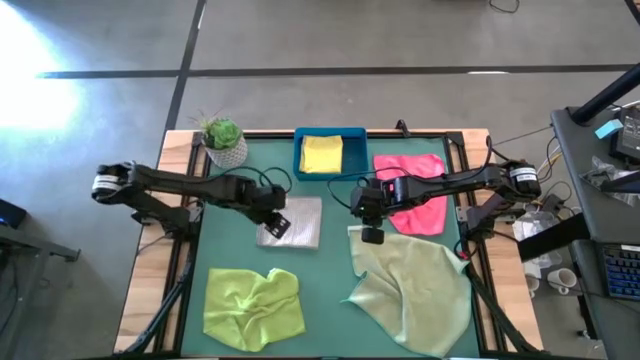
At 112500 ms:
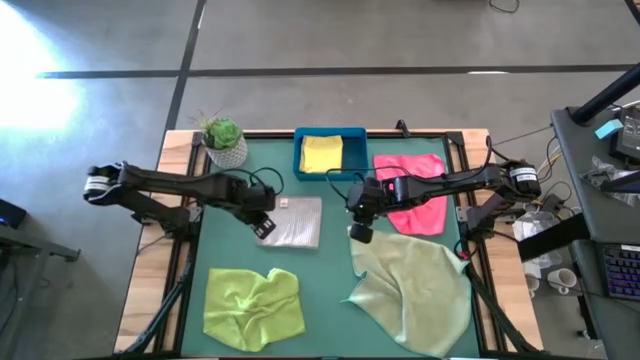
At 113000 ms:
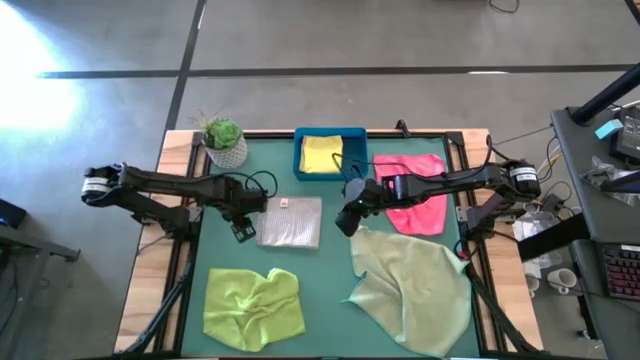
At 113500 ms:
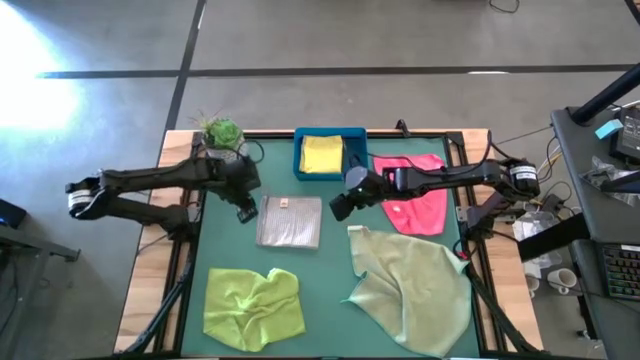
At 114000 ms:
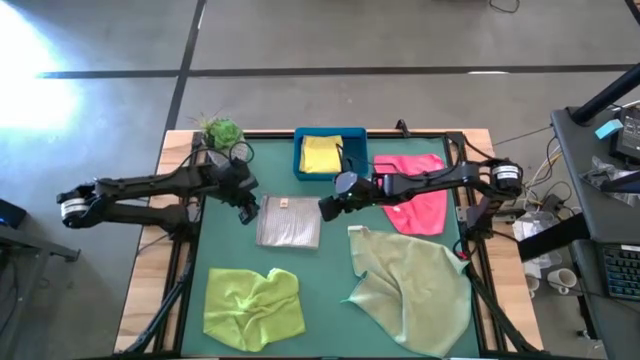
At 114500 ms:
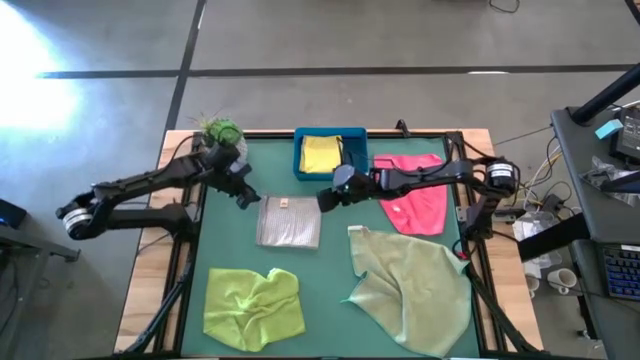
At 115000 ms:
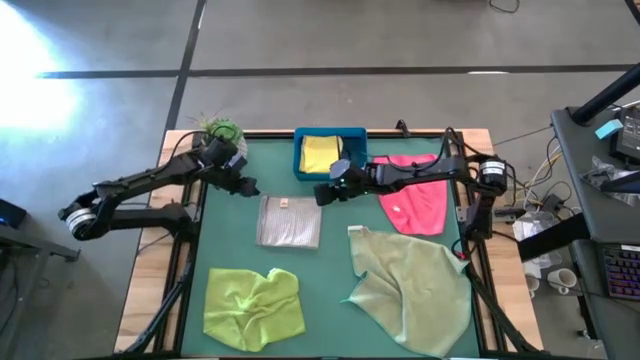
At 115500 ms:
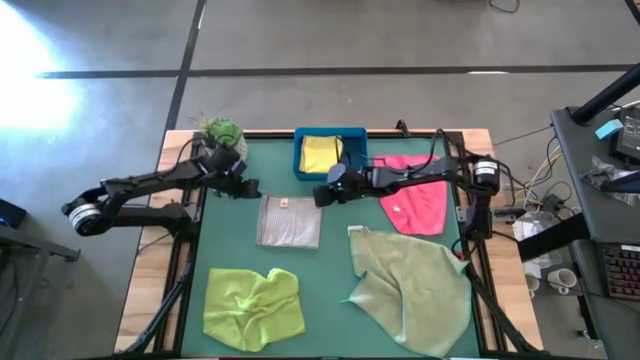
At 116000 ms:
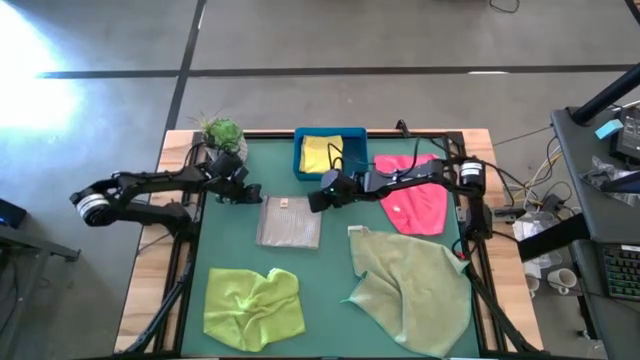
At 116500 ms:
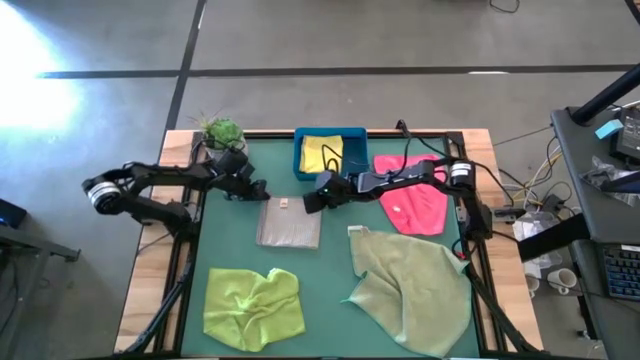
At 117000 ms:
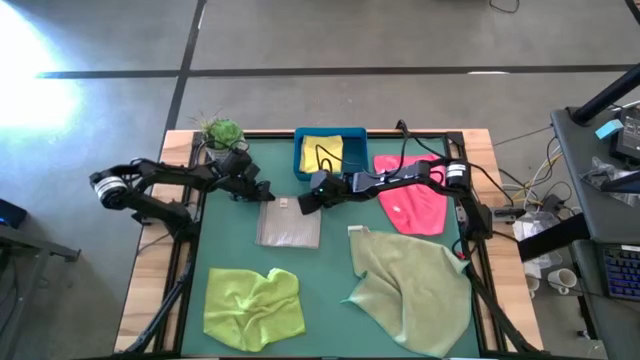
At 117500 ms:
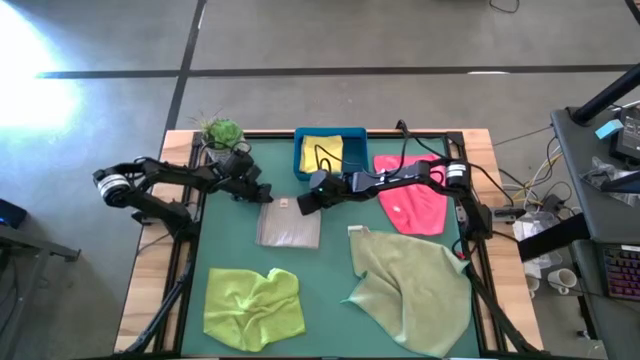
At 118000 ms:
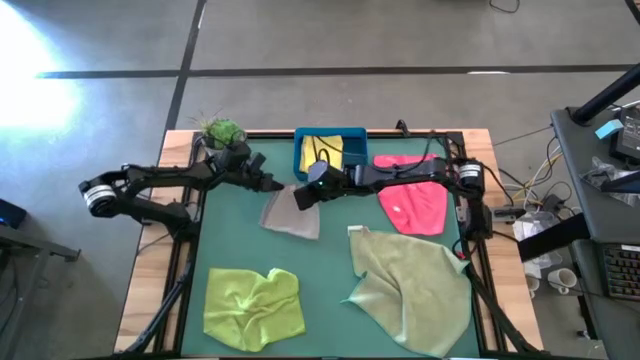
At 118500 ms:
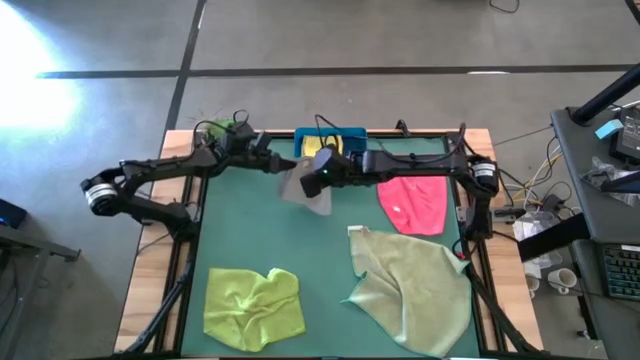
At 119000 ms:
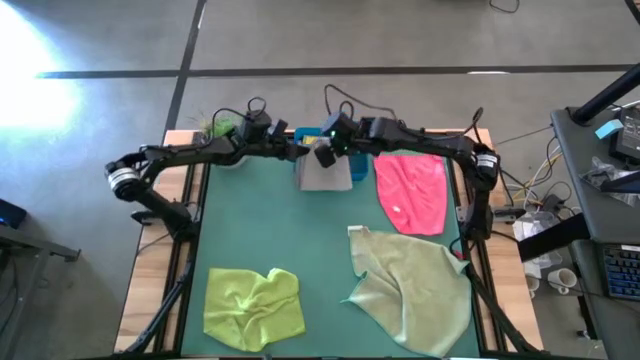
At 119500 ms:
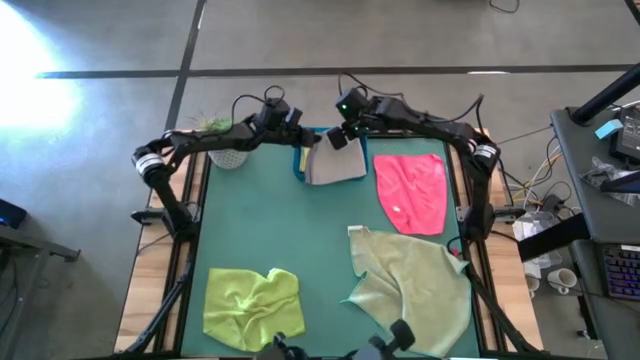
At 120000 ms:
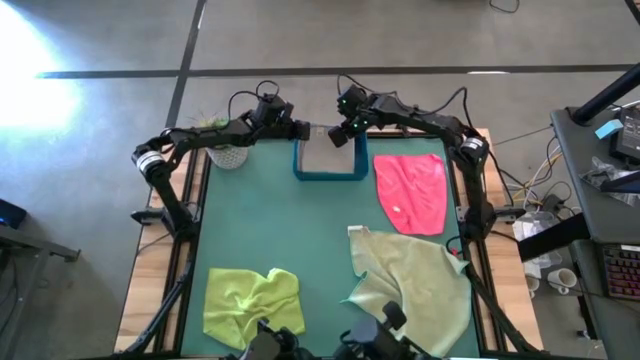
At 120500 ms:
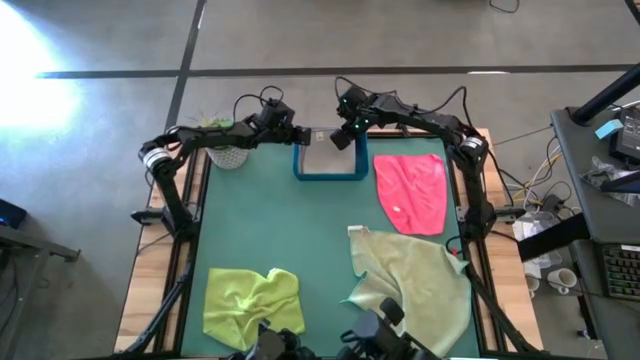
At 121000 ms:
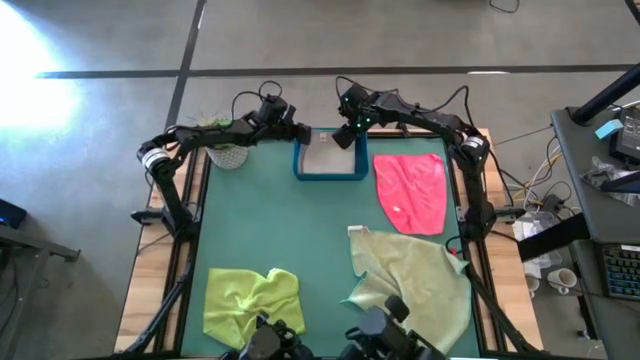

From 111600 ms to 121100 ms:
Task: Fold microfiber towels
Put the gray microfiber cloth into the blue bin

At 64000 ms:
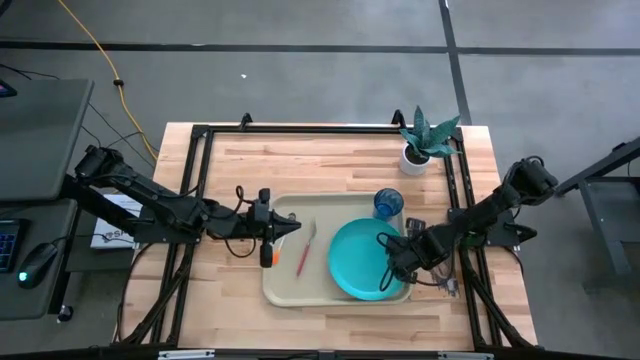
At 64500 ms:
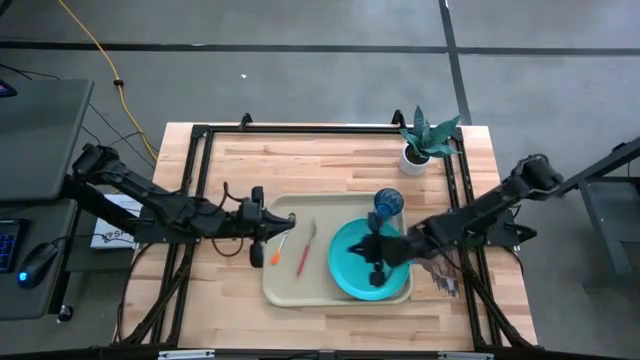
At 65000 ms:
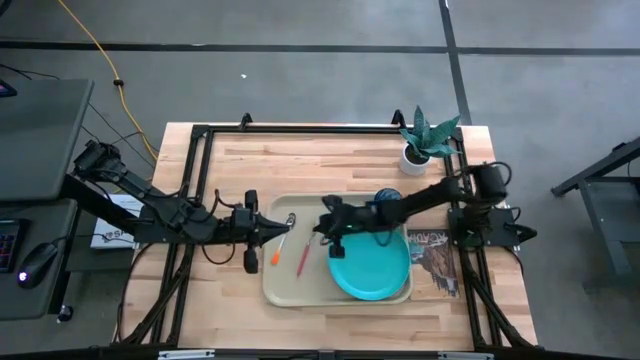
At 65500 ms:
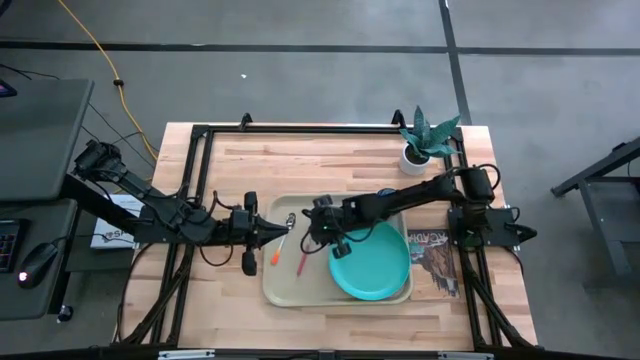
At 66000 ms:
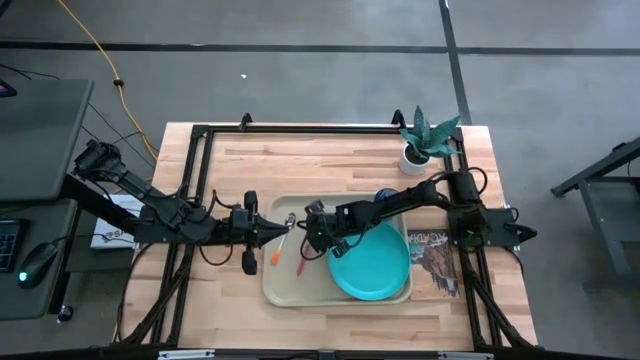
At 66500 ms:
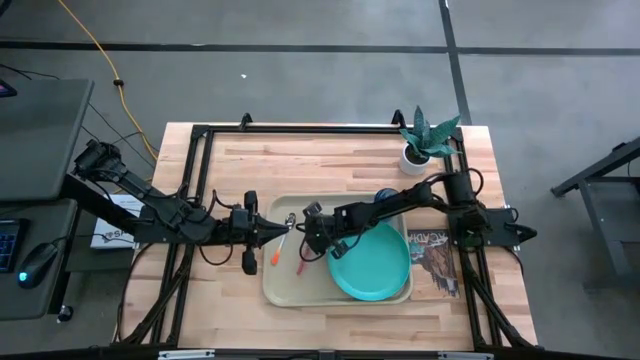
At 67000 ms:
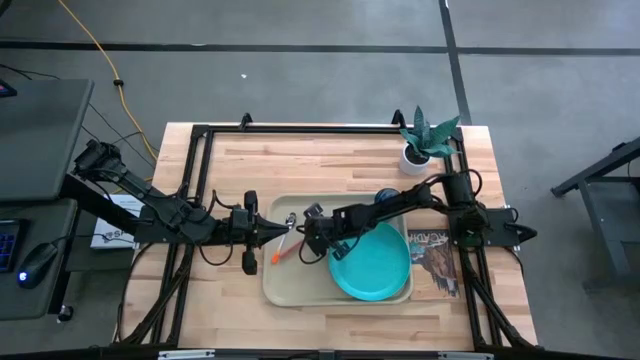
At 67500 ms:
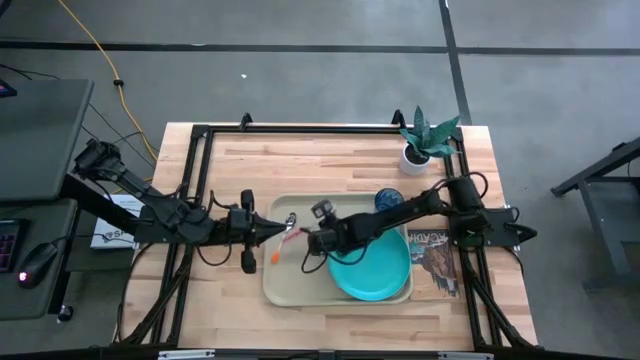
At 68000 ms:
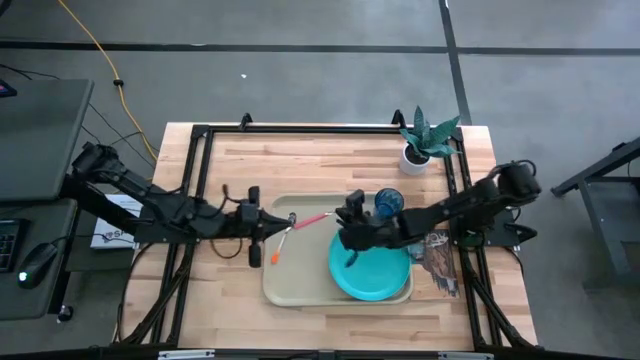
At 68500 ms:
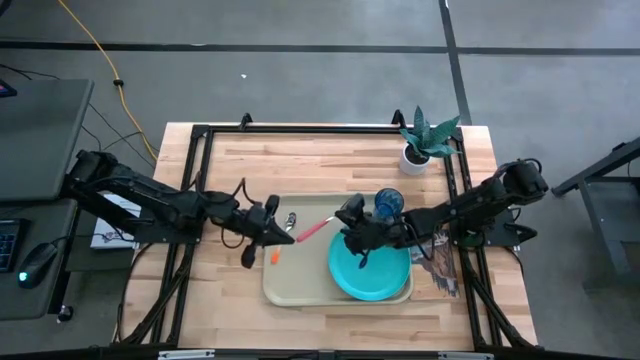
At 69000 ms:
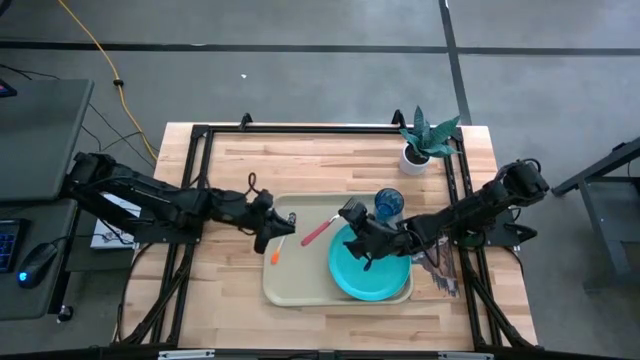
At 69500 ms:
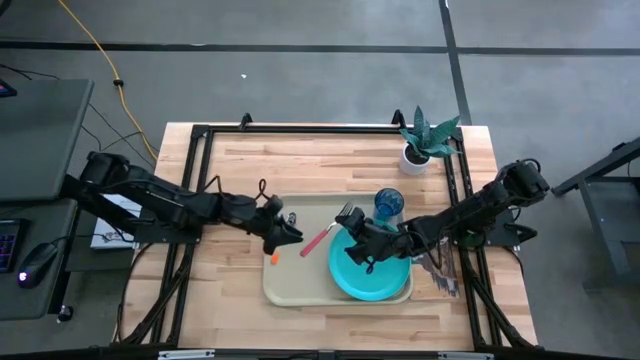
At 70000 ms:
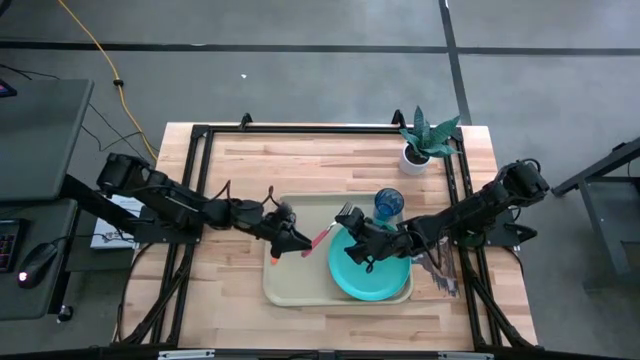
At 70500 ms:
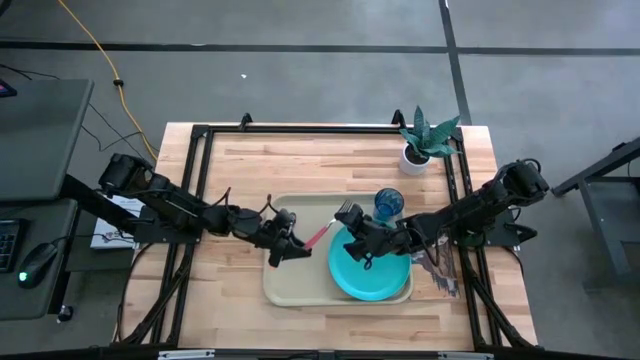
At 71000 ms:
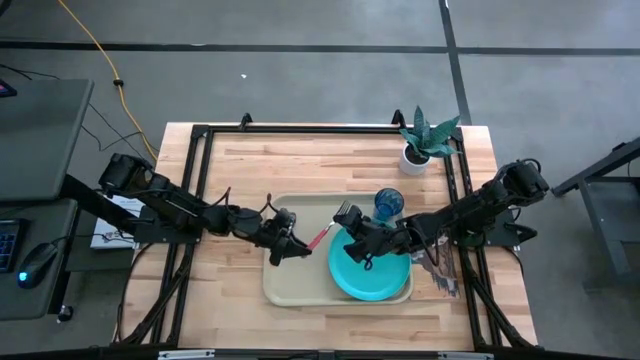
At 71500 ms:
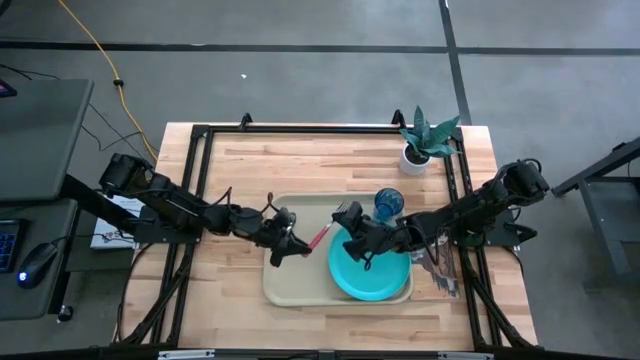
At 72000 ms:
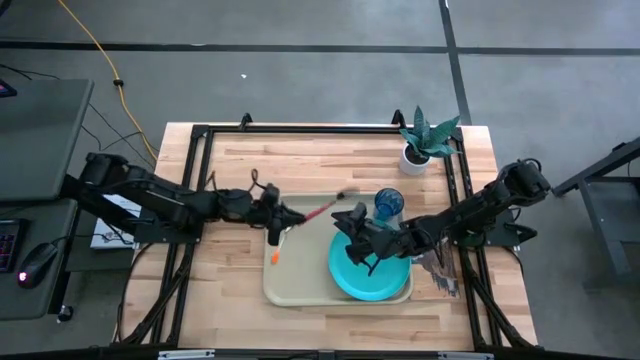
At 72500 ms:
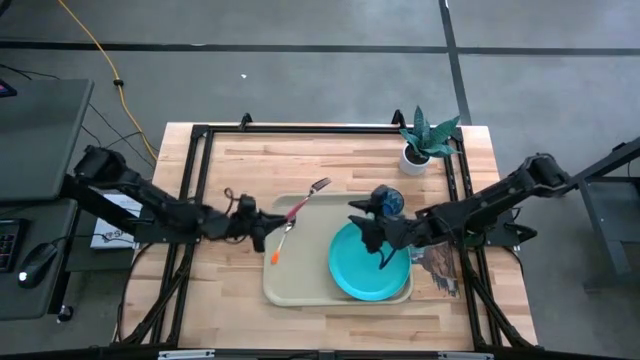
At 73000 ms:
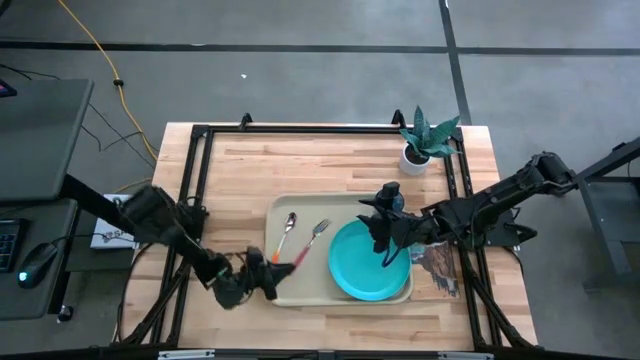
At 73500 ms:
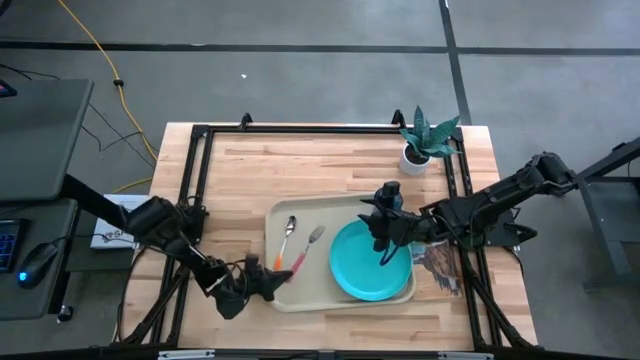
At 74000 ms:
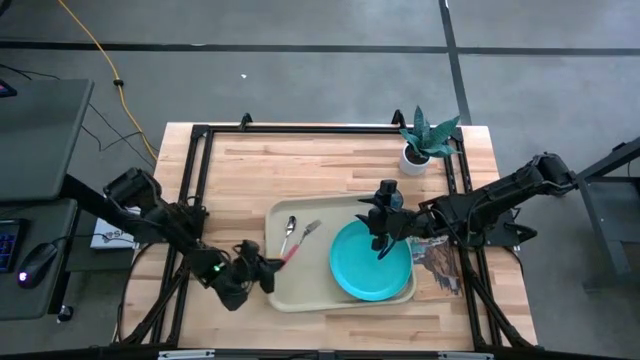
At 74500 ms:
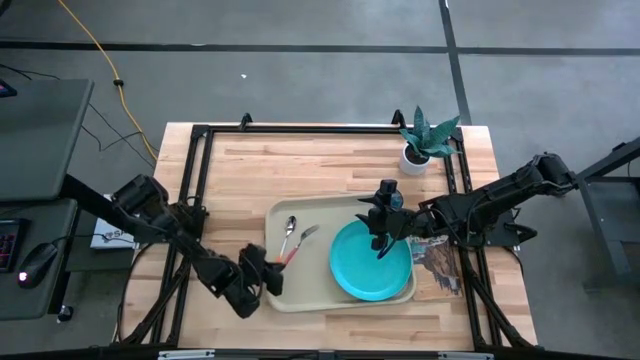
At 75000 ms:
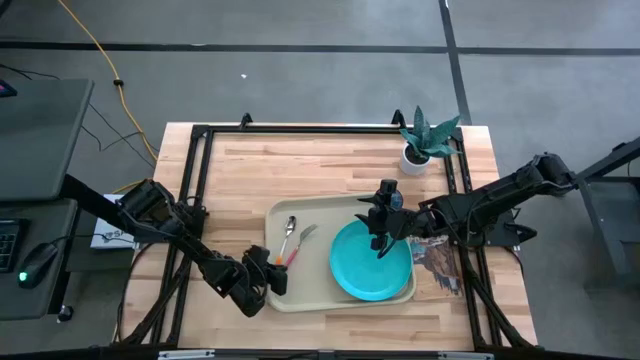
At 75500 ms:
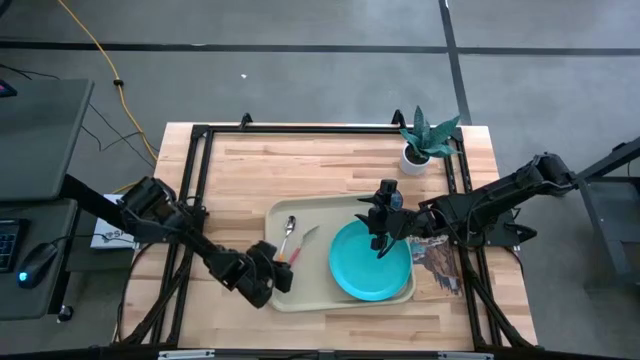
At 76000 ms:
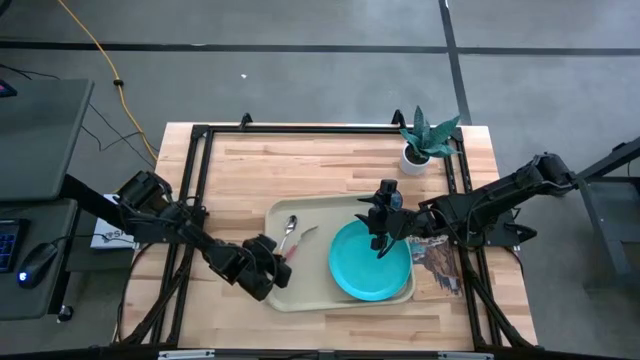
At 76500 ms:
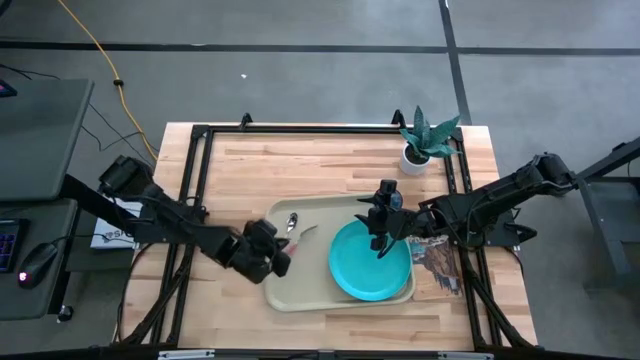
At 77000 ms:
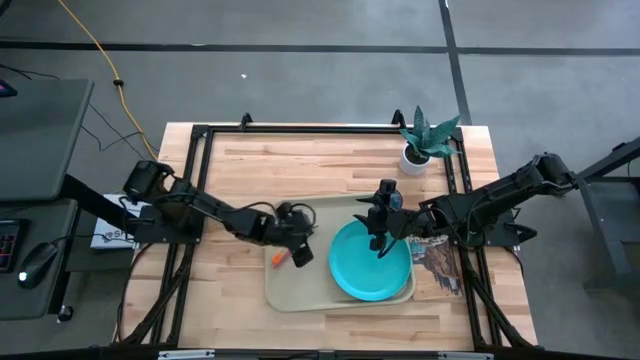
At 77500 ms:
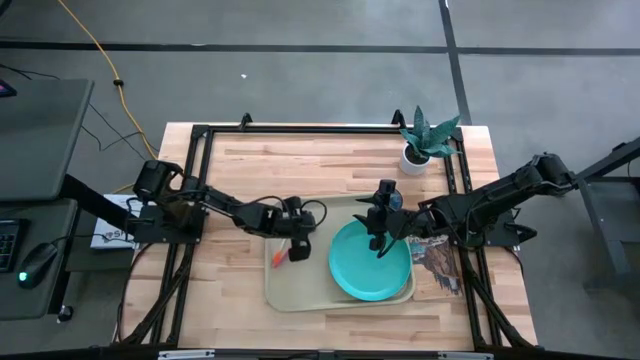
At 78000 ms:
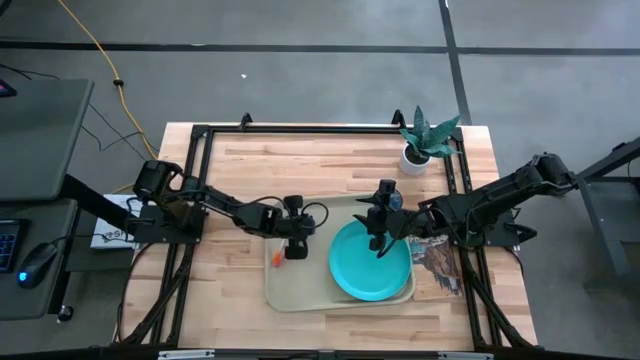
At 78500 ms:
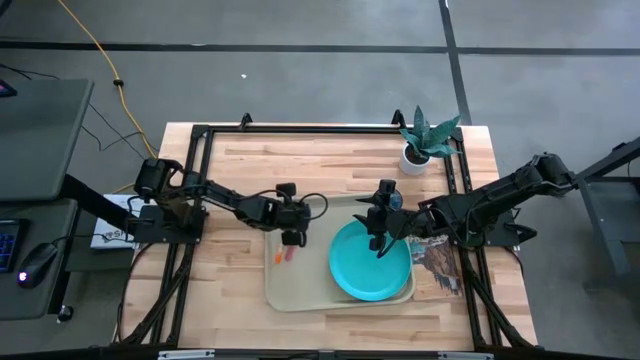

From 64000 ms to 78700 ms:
Task: Pick and place plate/cup/fork/spoon on tray
Adjust the pink fork on the gray serving tray
